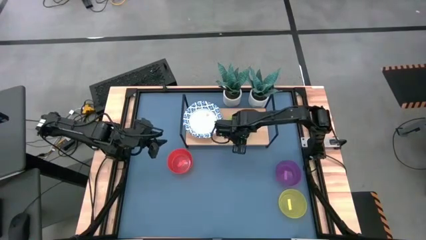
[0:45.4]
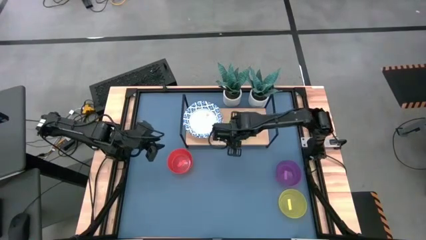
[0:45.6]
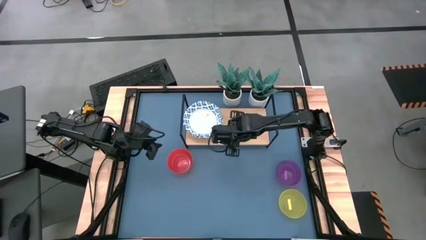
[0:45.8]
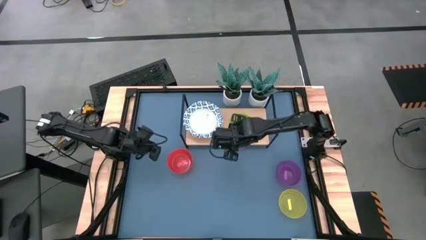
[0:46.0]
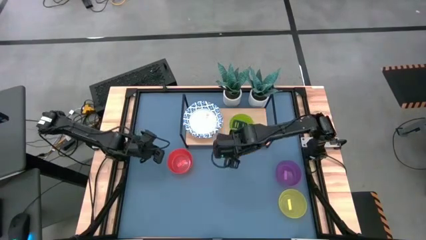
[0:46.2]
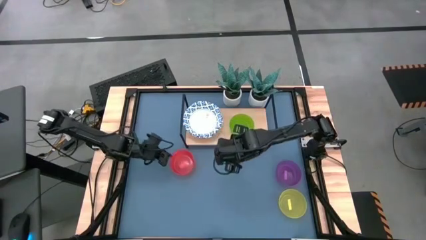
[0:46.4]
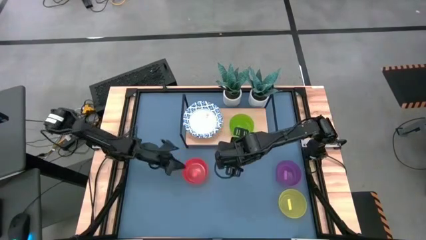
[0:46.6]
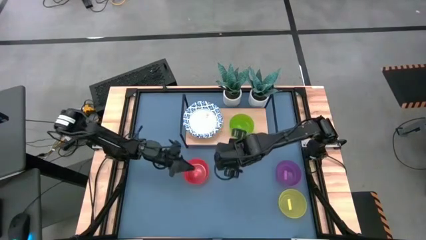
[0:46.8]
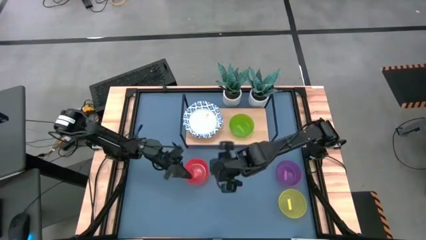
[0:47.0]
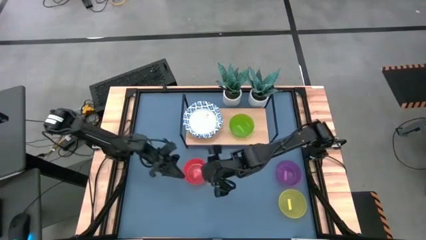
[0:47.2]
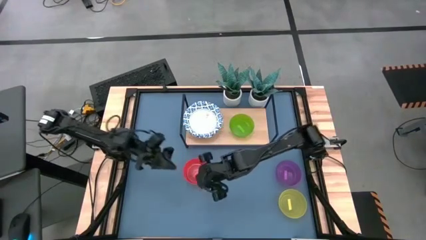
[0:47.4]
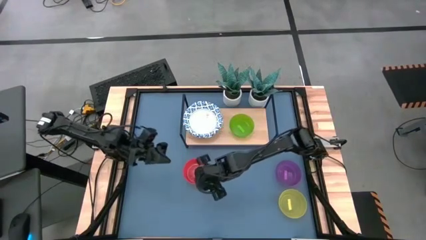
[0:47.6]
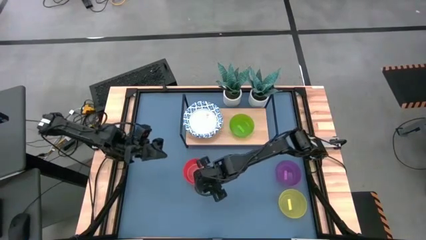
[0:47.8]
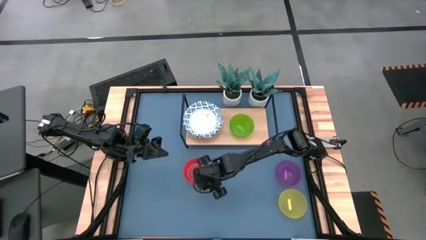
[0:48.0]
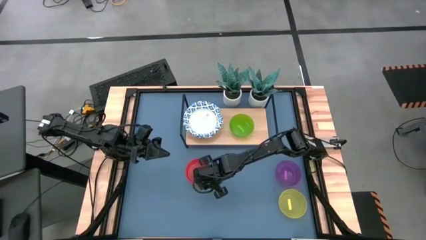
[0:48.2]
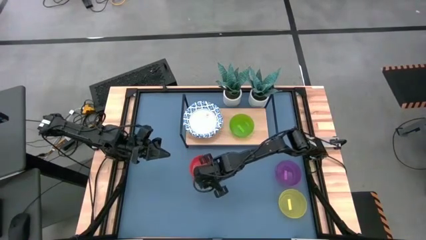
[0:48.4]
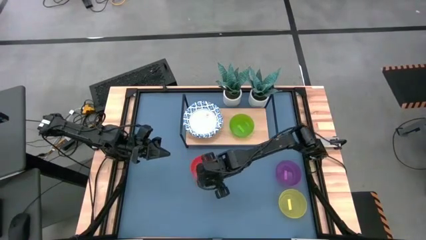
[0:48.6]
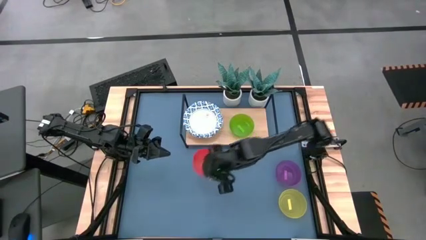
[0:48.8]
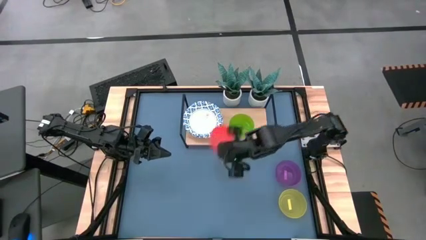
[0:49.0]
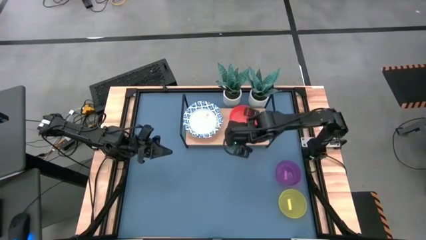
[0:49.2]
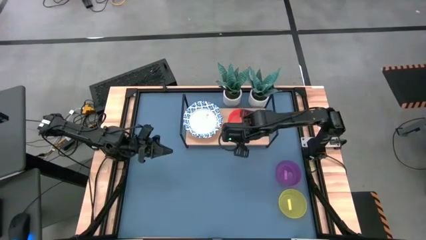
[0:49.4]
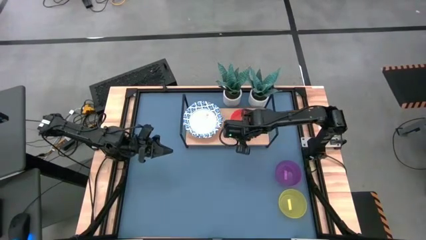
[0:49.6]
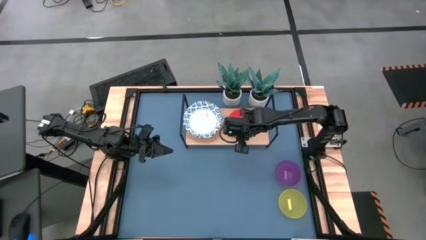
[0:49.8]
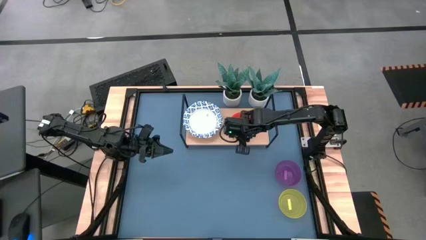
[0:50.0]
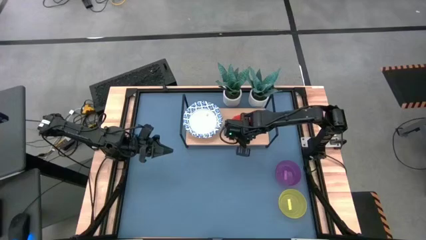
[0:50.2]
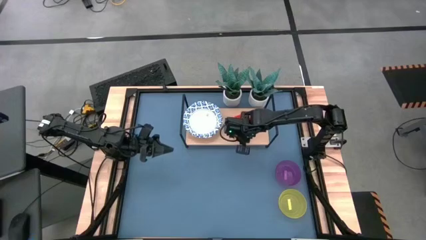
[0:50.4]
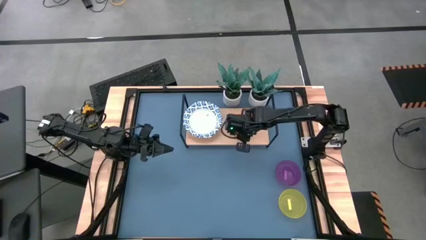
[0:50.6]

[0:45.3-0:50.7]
Task: Place and stack bowls onto a shelf
Stack the orange bowl on top of the other green bowl on the shelf

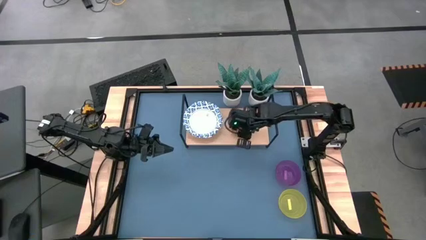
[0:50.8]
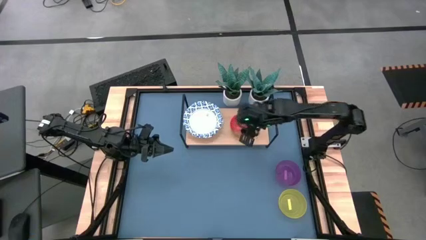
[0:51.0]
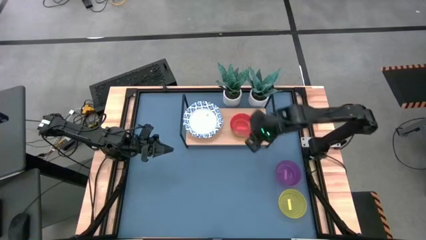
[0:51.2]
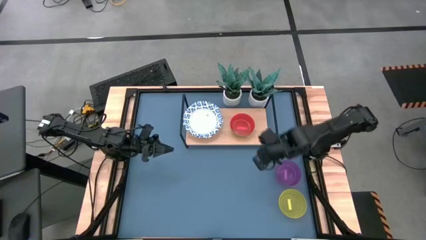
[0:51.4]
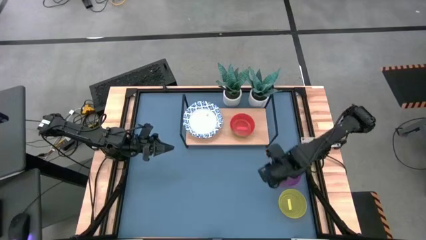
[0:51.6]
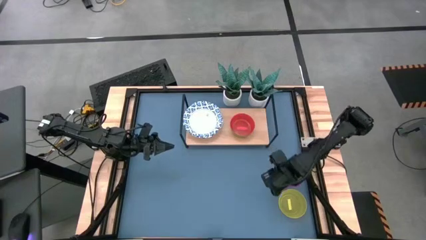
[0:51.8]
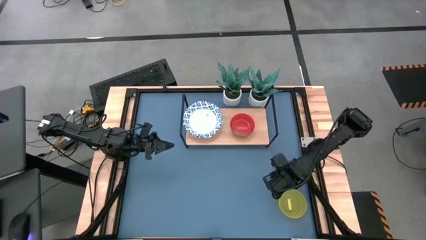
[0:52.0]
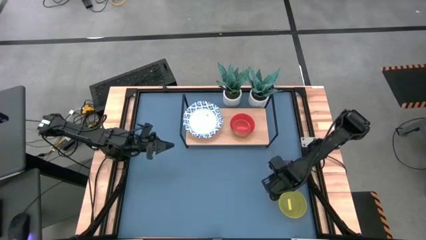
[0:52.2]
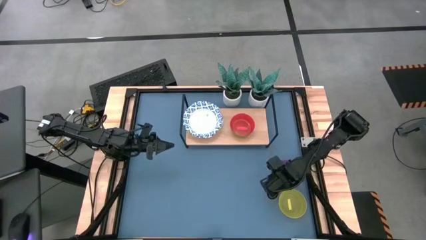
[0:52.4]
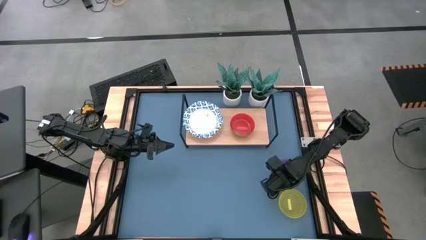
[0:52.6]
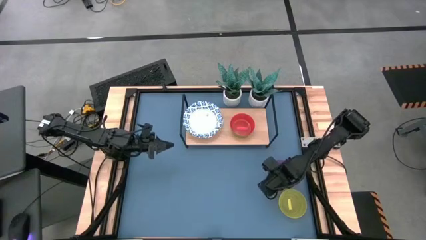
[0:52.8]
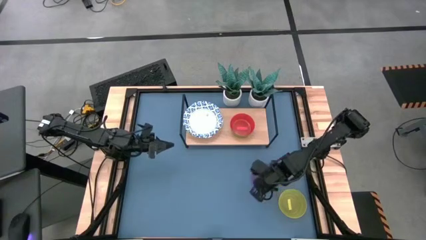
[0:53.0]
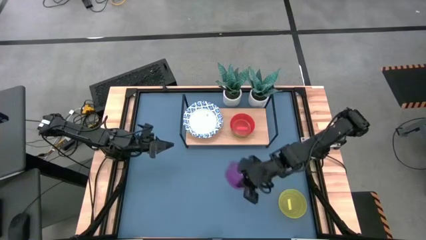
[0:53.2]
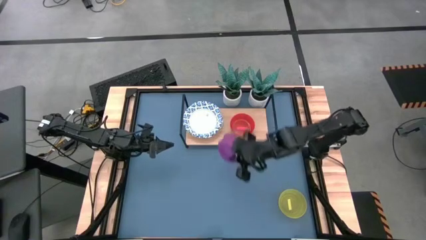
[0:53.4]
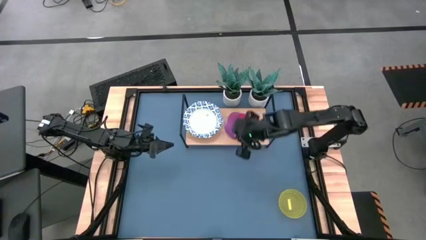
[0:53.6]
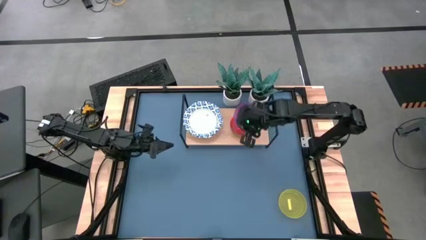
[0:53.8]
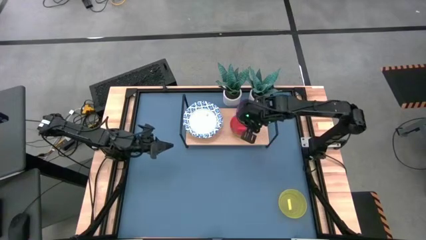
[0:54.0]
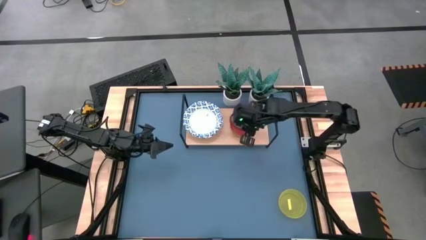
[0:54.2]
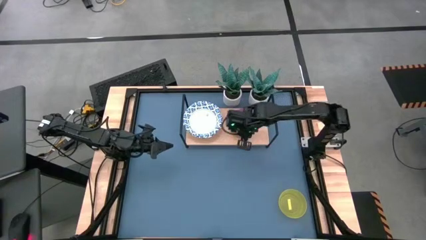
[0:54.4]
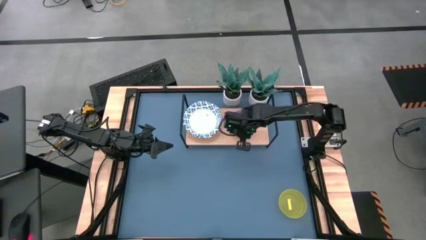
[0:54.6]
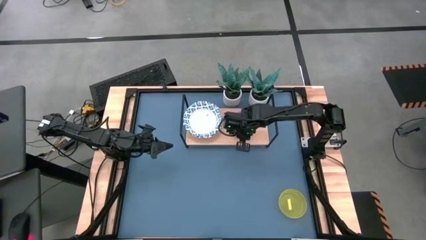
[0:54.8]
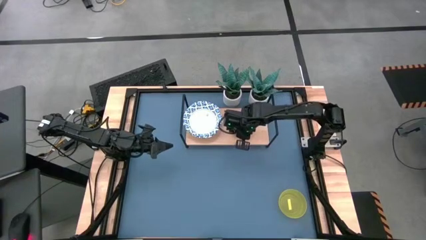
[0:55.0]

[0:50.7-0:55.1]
Stack the purple bowl on top of the other orange bowl on the shelf

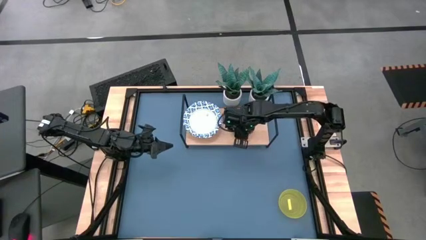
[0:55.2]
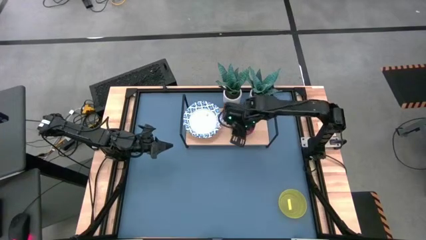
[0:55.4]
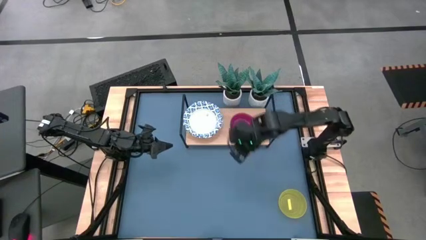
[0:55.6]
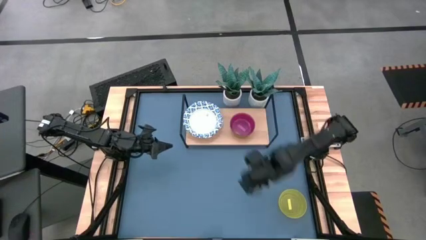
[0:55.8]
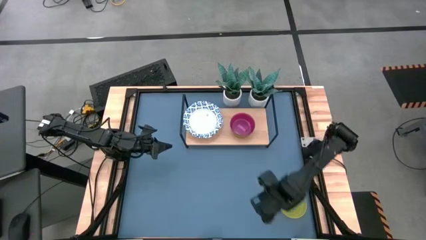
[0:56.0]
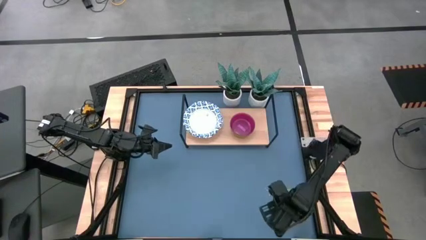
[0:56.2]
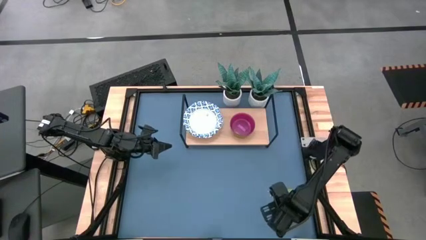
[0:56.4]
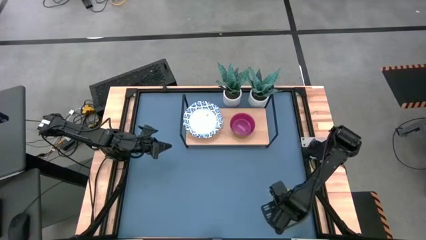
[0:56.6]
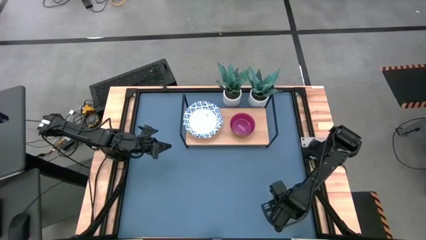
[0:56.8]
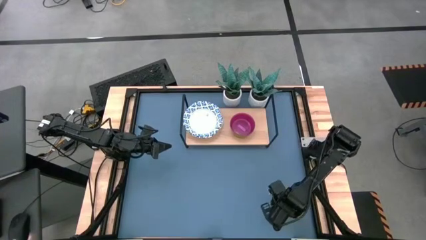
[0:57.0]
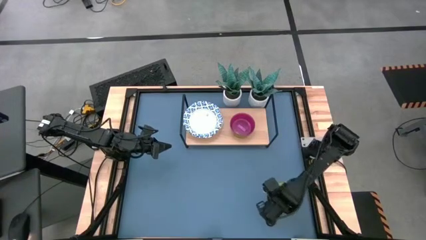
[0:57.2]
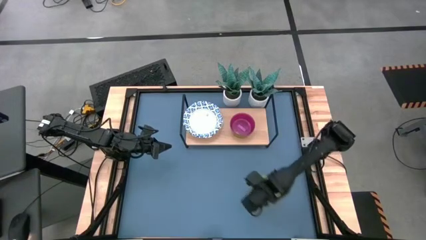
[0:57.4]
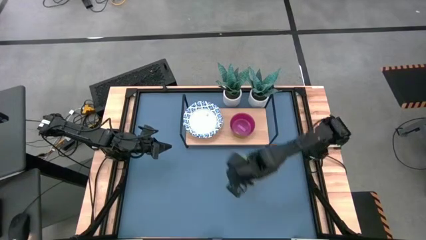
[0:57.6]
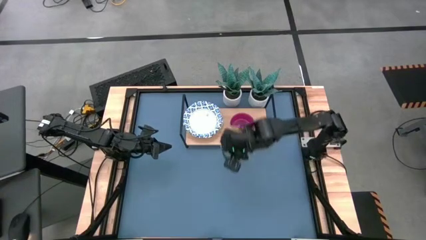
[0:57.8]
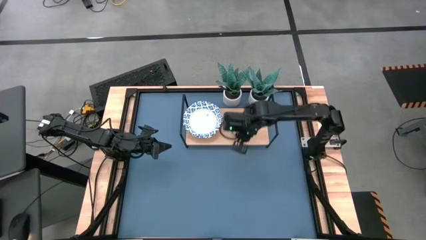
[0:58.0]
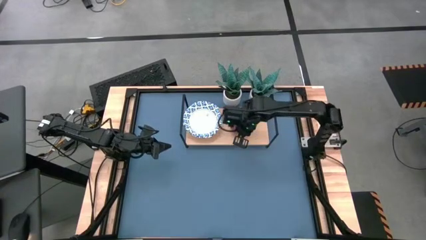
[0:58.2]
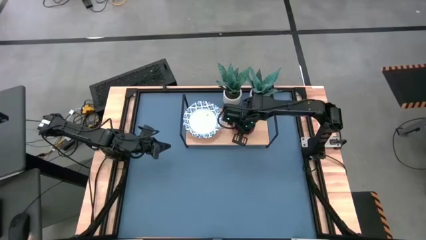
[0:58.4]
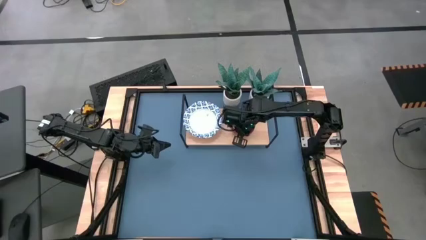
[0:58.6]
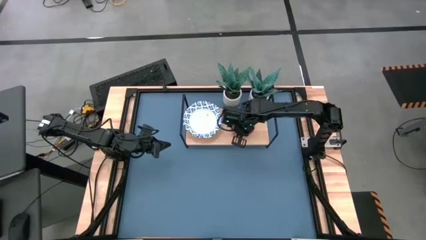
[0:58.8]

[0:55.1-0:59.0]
Stack the yellow bowl on top of the other purple bowl on the shelf
